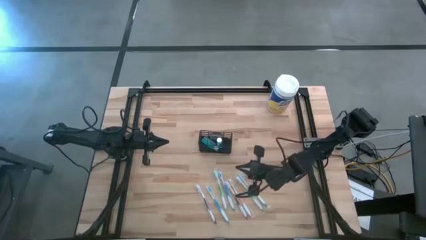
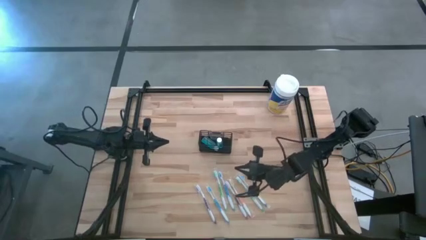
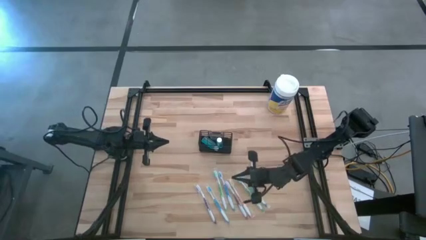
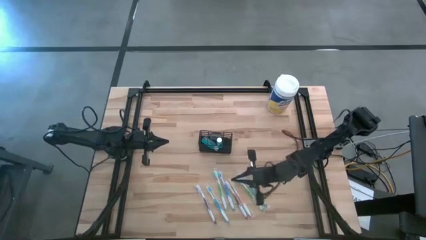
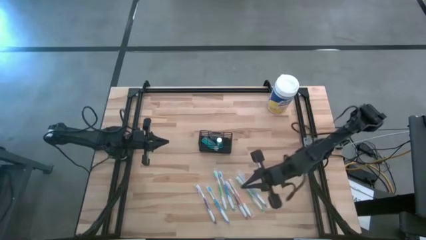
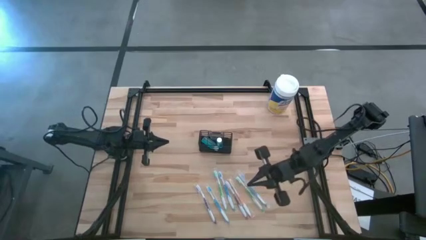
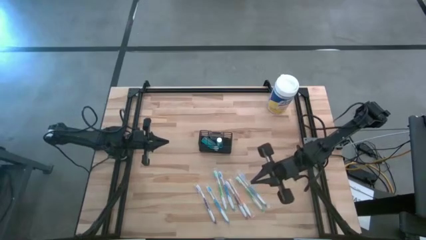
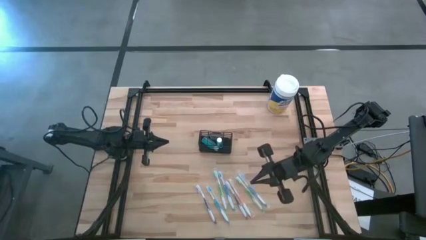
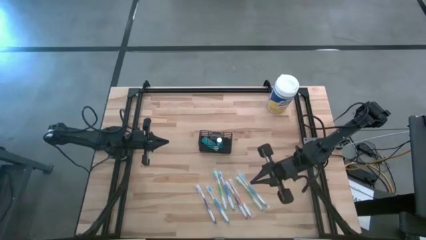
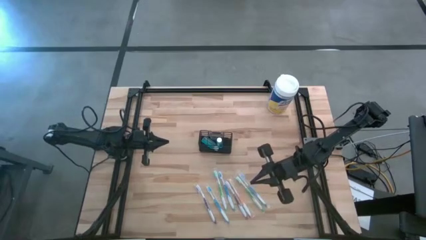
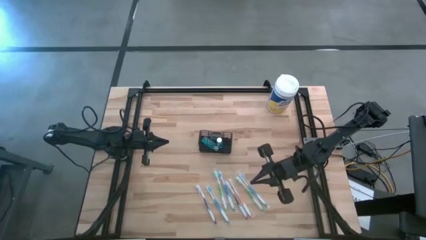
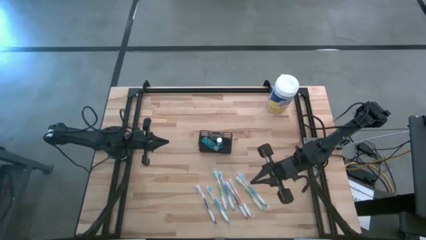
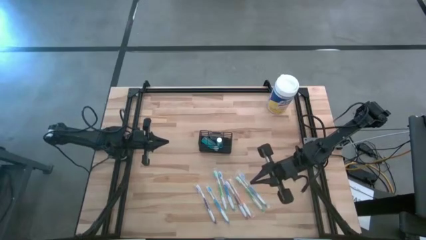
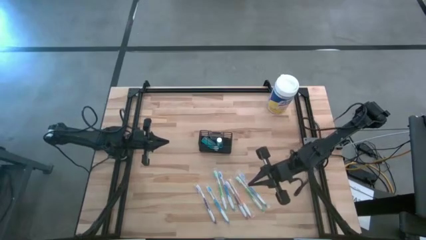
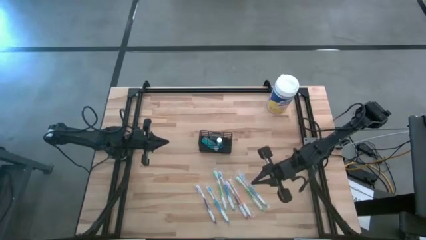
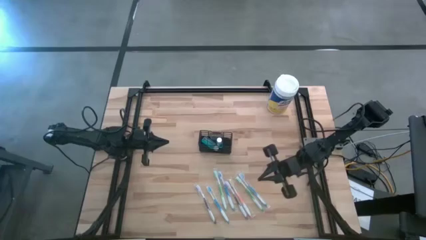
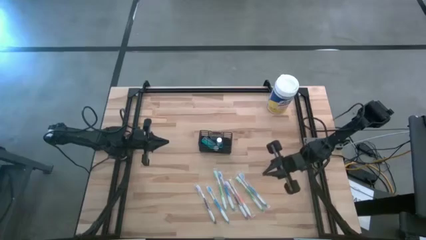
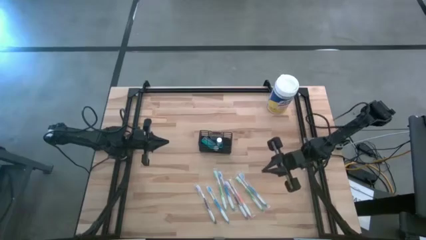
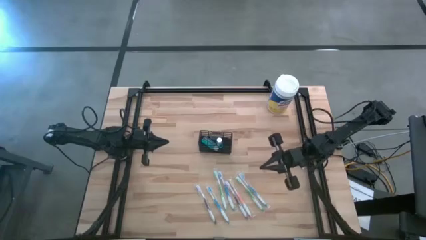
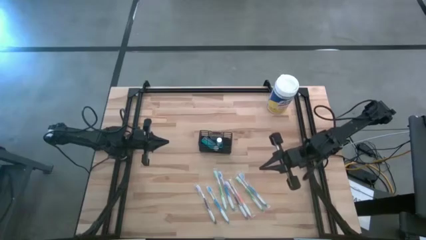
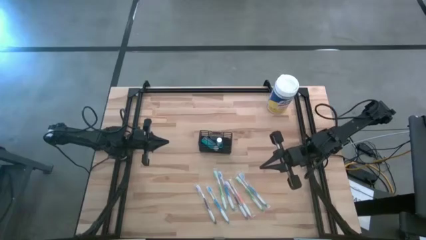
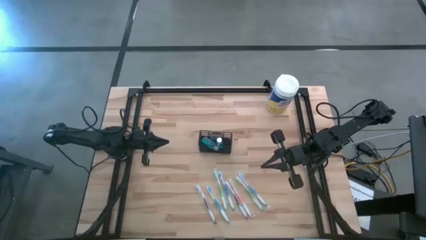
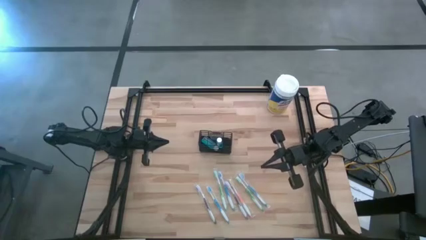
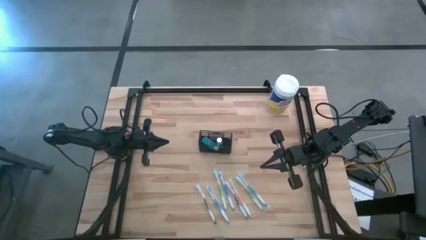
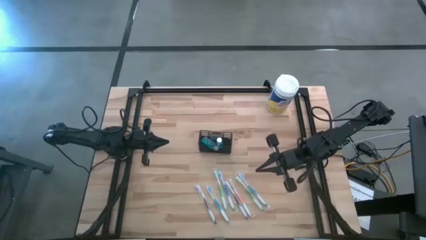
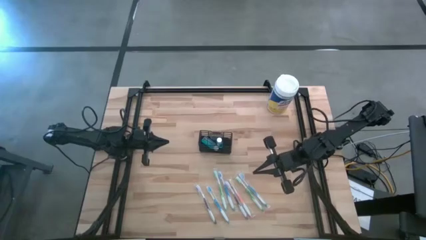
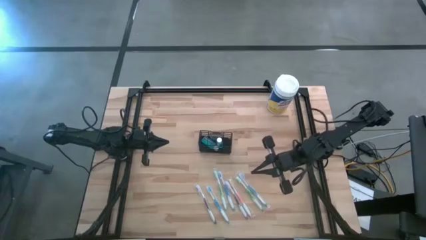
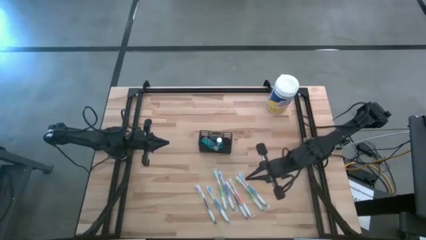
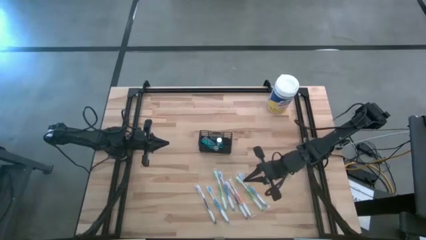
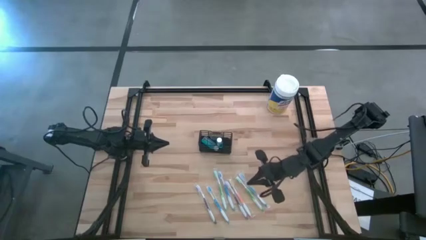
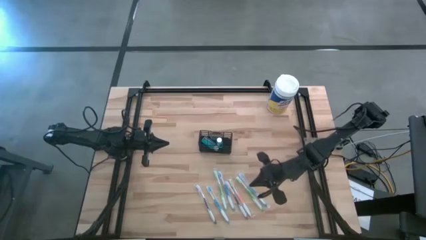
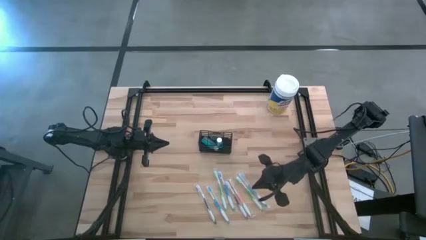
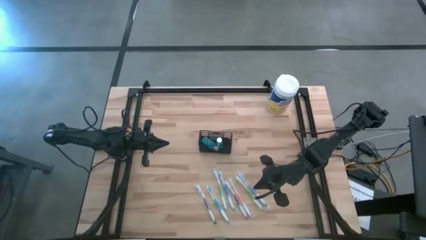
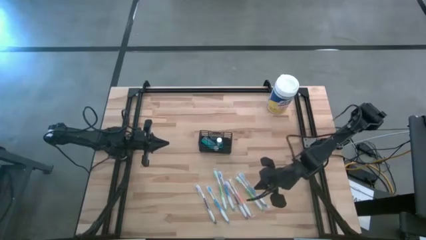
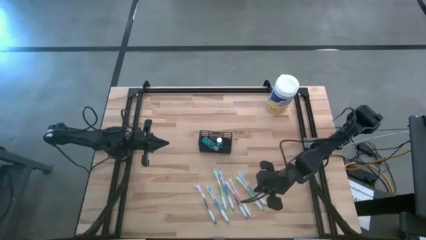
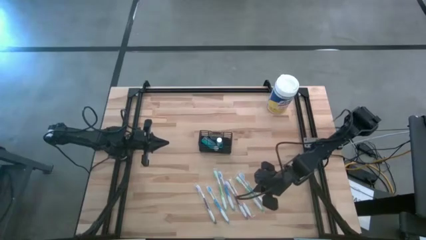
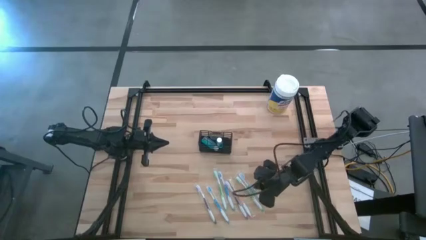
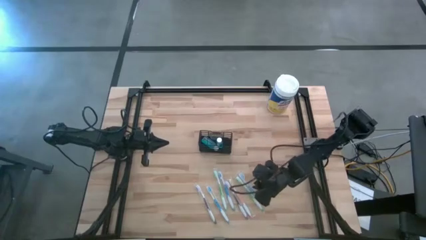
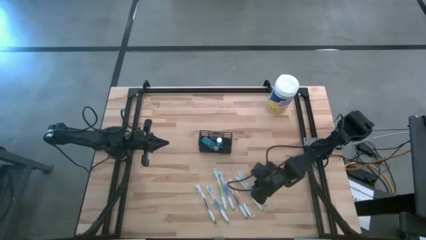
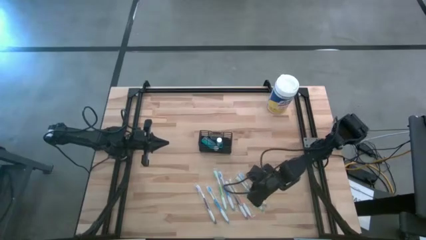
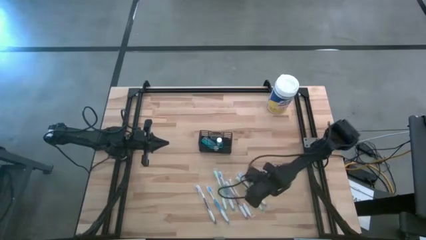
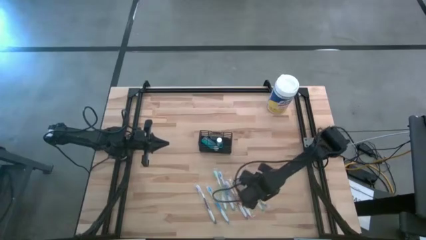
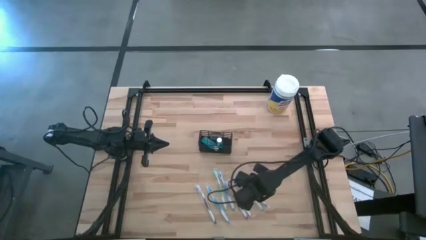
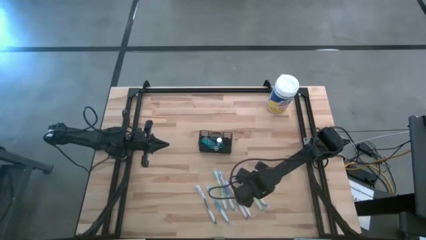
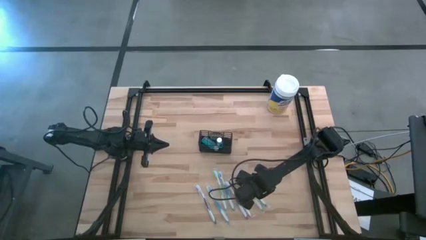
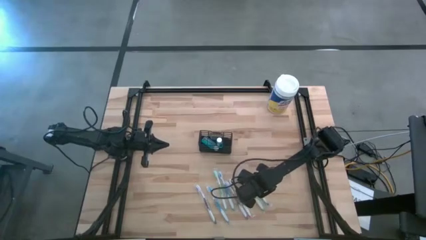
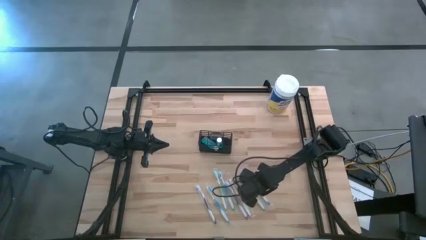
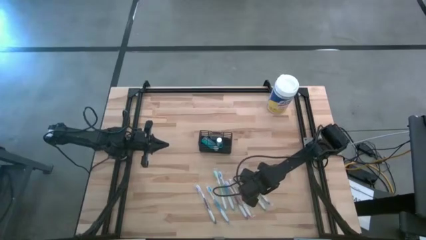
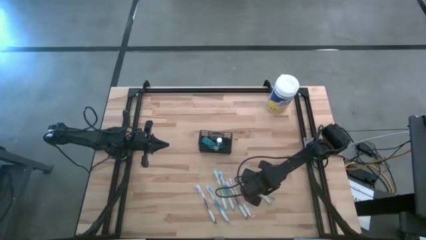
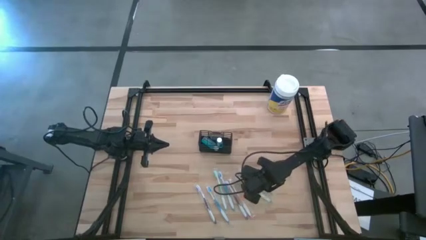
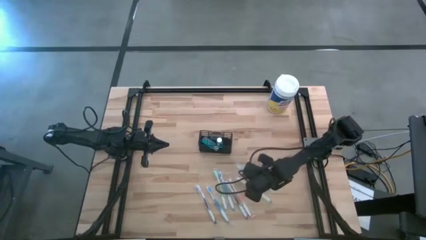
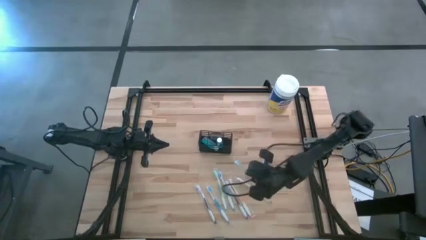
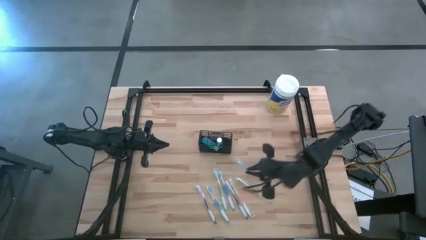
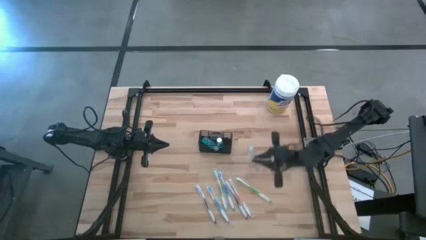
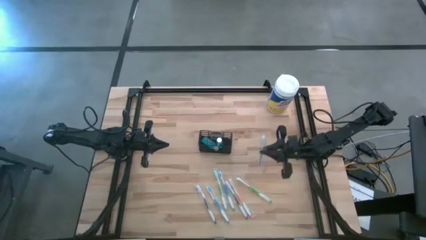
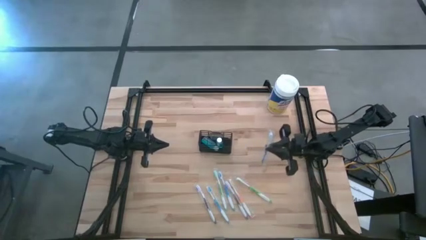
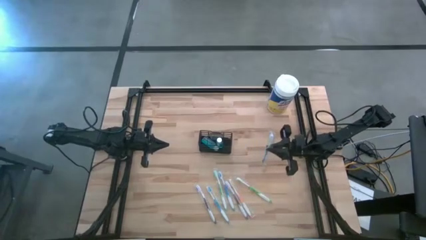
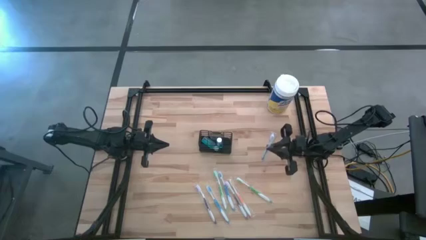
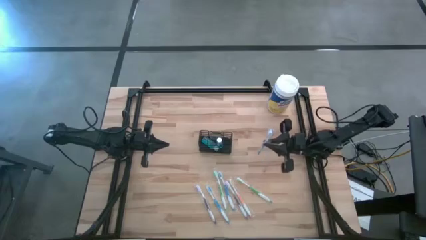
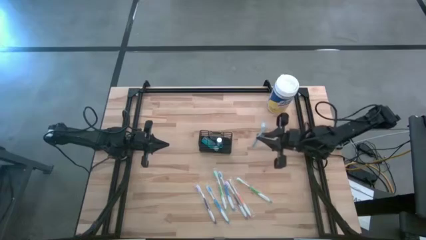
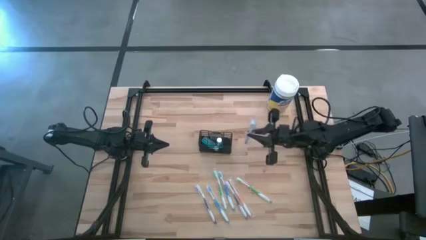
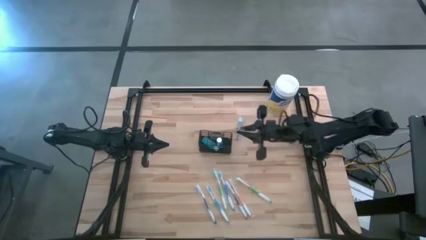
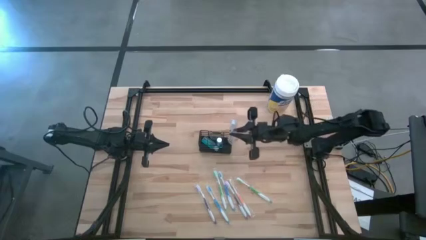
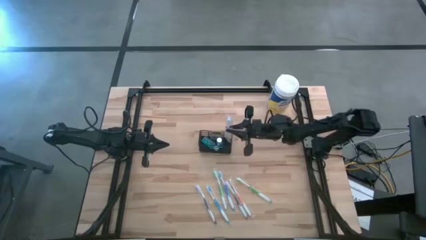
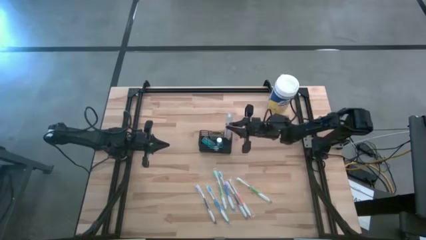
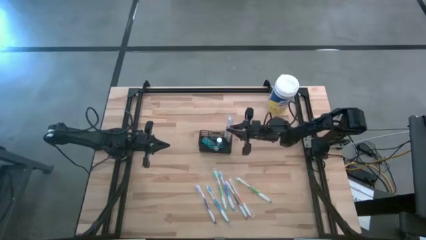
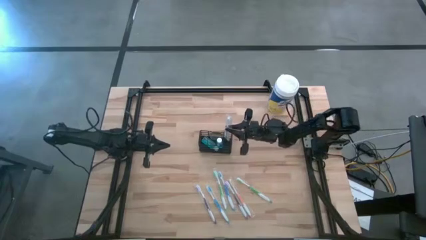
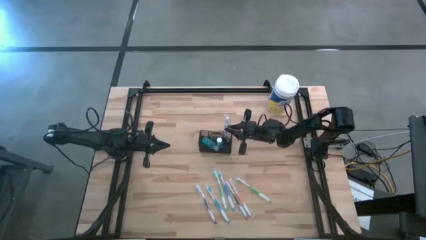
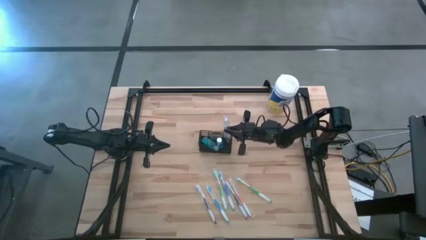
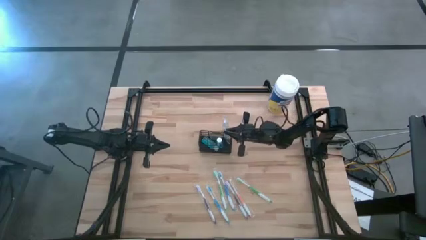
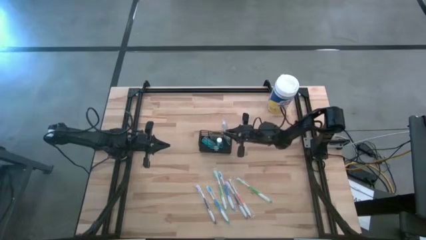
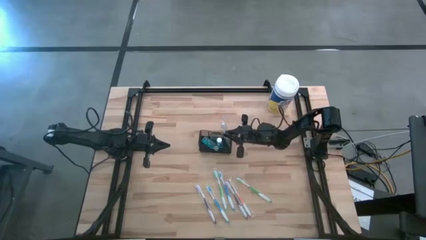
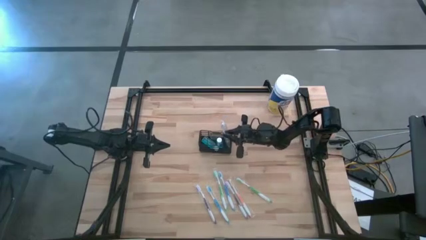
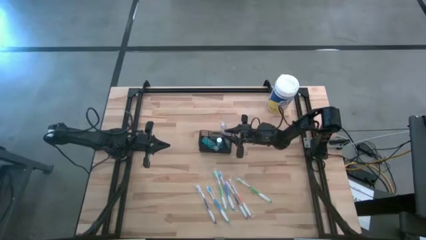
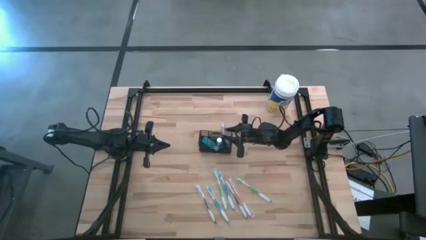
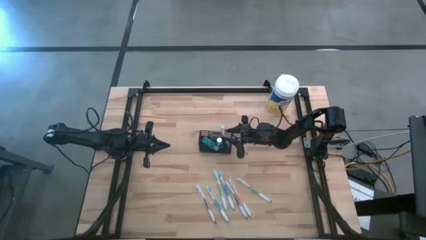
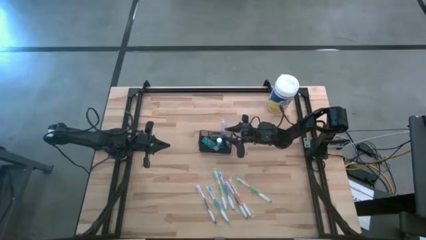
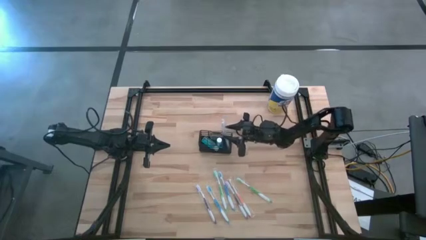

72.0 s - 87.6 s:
Task: Pick & Place toothbrushing station
Put the right blue toothbrush into the black wire organizer

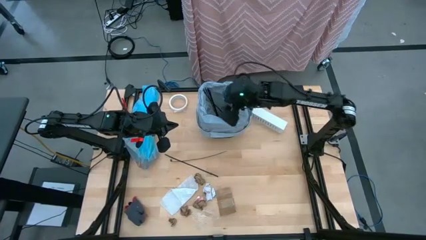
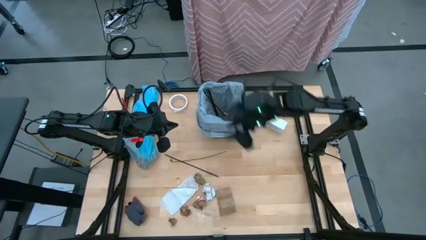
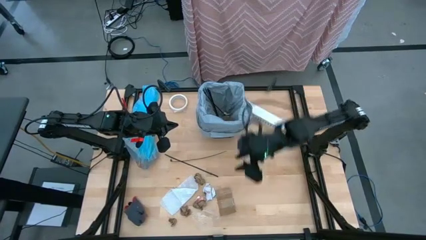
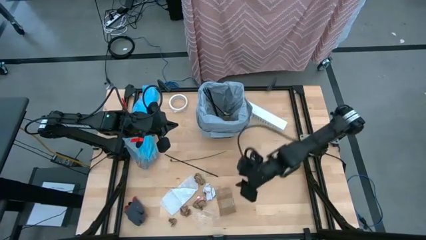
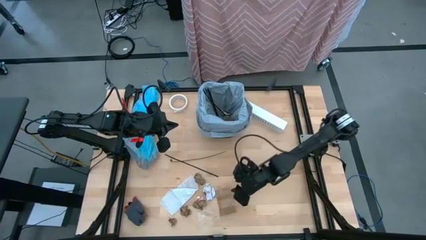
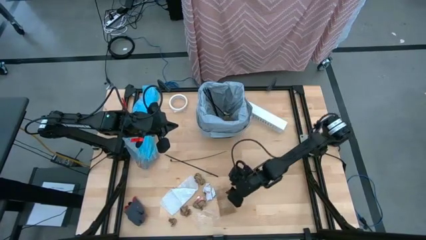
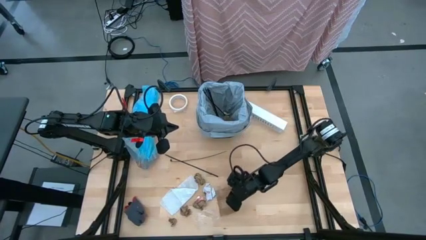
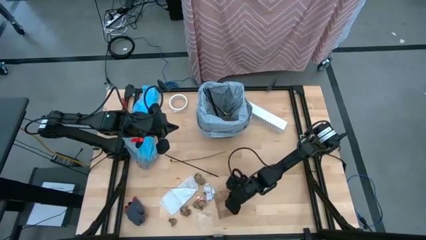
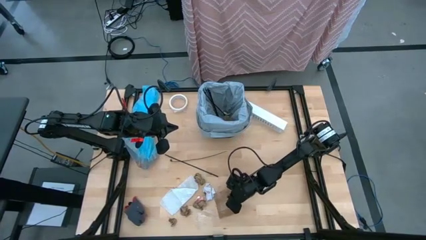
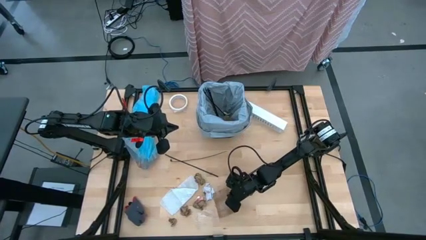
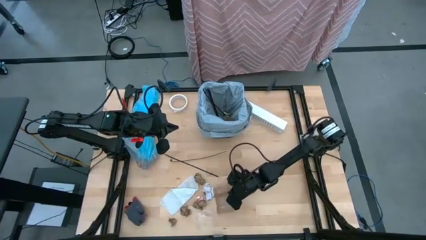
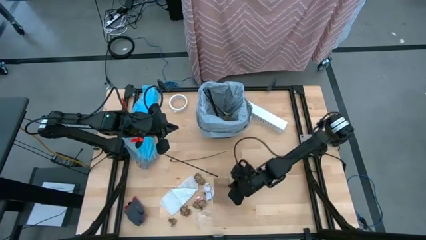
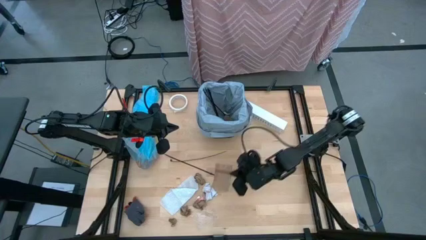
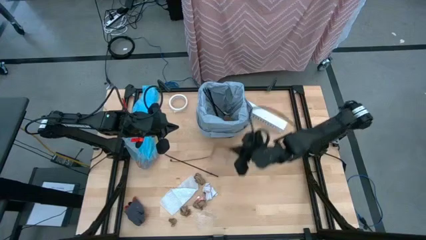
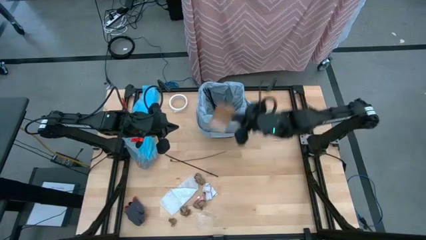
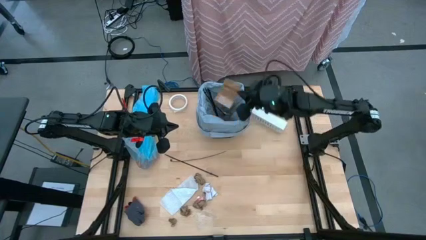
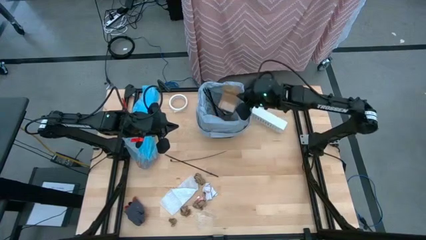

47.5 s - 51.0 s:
Task: place trash/remove bag and relplace
Put the brown cardboard into the trash bin
